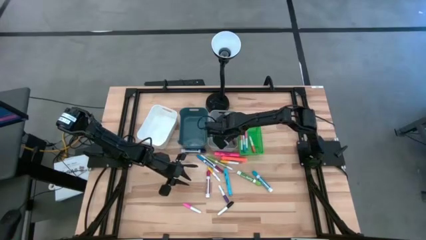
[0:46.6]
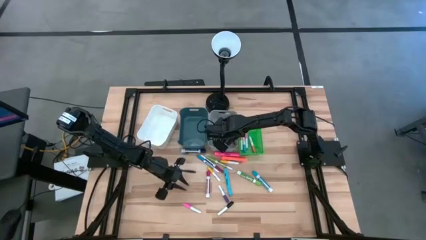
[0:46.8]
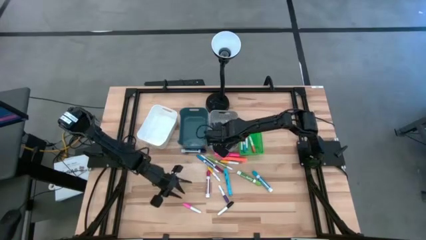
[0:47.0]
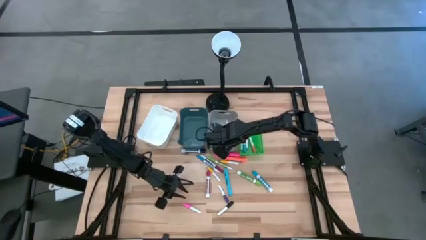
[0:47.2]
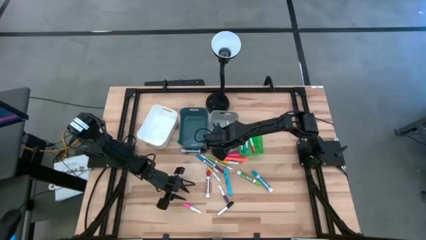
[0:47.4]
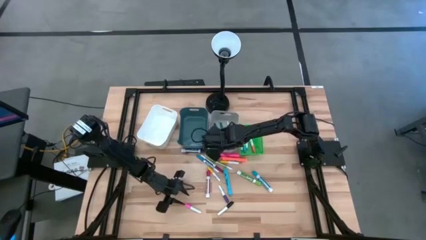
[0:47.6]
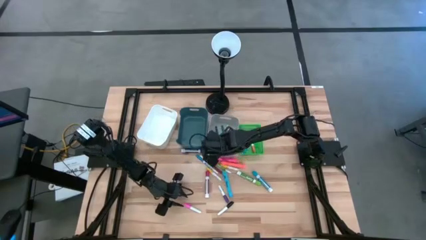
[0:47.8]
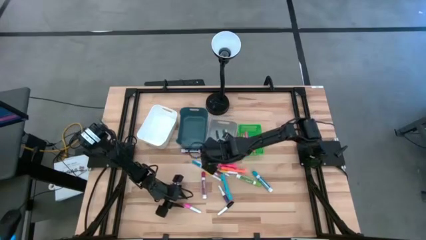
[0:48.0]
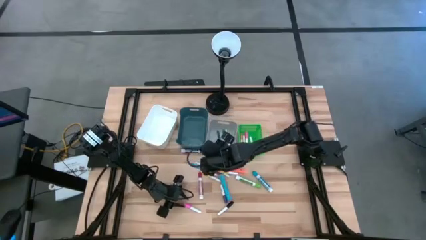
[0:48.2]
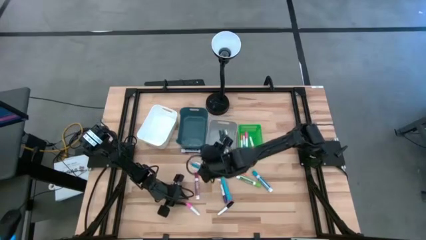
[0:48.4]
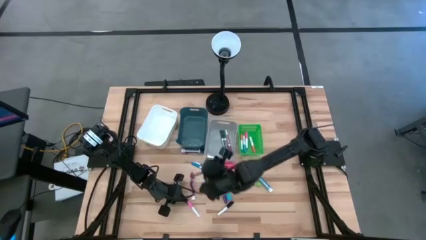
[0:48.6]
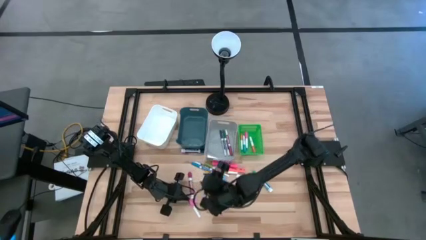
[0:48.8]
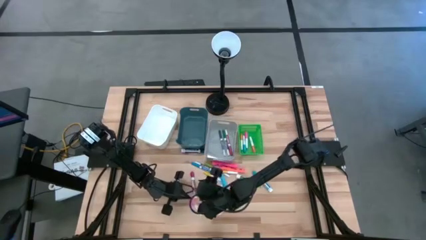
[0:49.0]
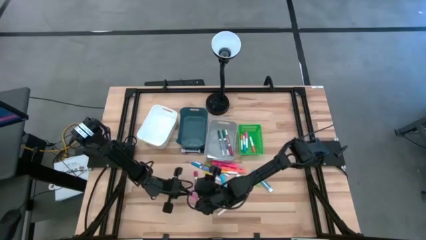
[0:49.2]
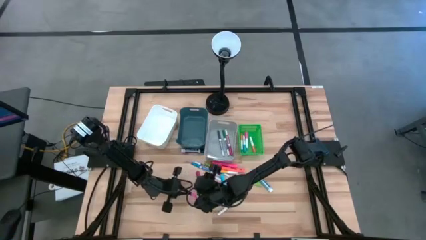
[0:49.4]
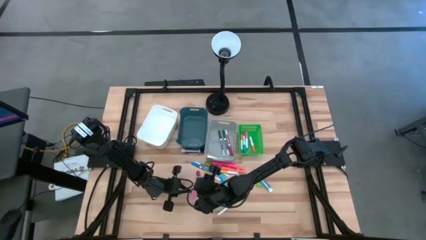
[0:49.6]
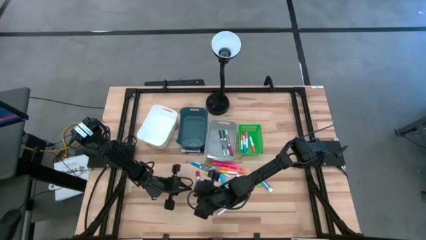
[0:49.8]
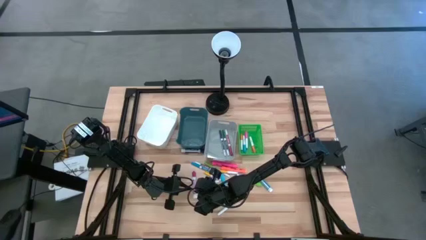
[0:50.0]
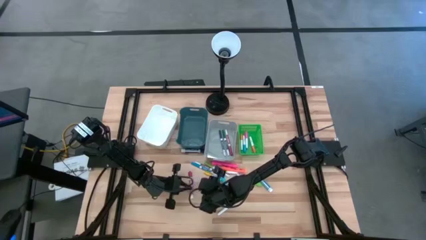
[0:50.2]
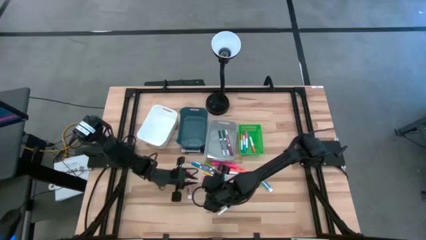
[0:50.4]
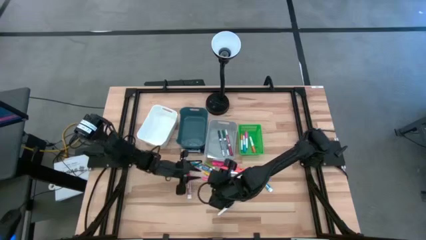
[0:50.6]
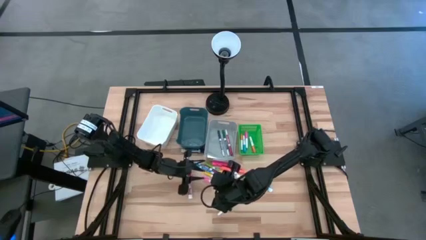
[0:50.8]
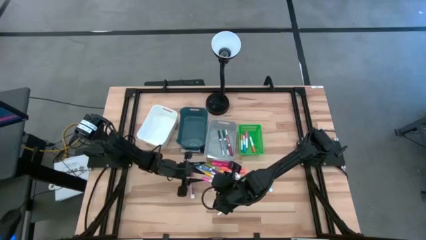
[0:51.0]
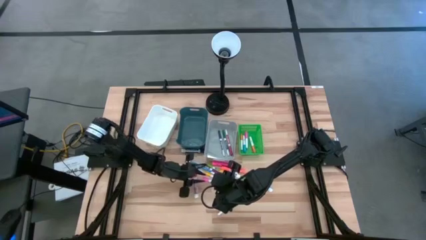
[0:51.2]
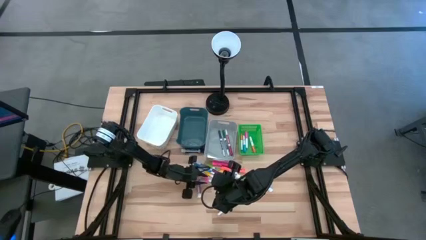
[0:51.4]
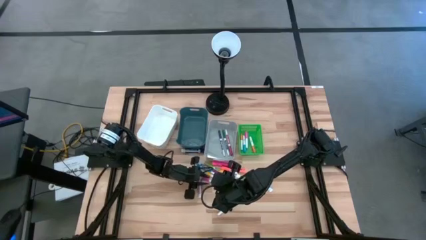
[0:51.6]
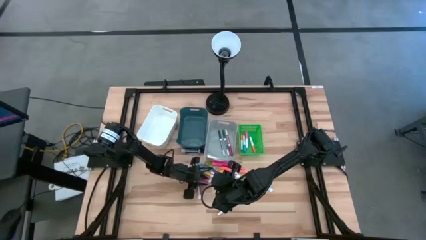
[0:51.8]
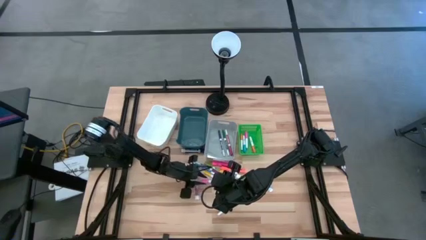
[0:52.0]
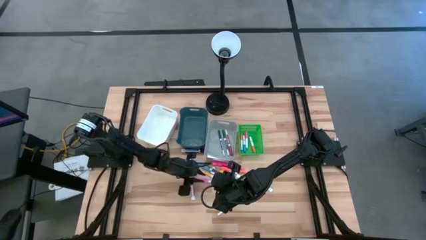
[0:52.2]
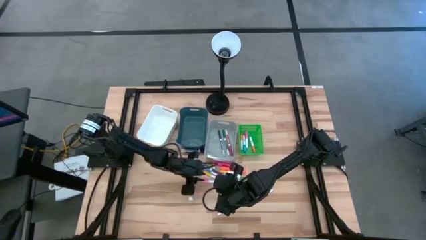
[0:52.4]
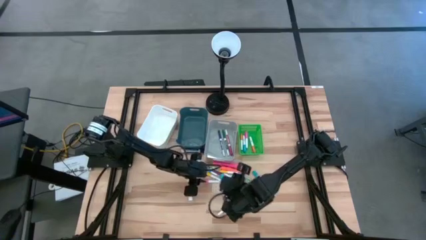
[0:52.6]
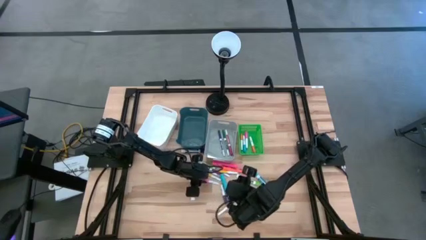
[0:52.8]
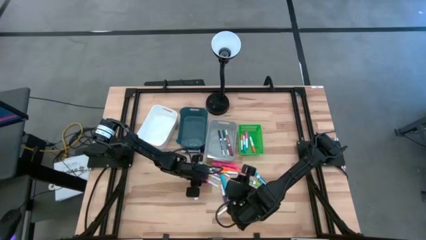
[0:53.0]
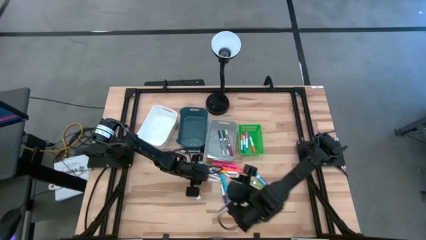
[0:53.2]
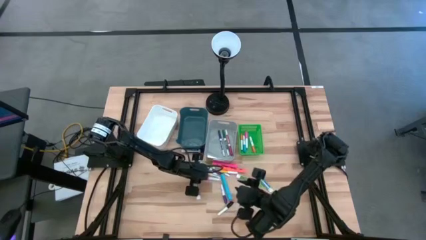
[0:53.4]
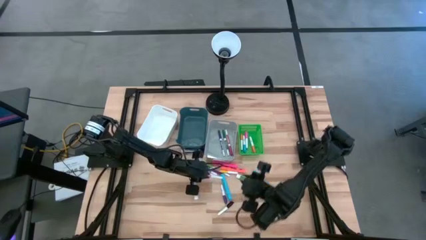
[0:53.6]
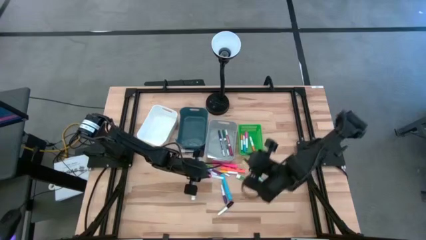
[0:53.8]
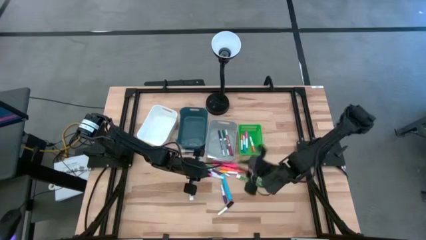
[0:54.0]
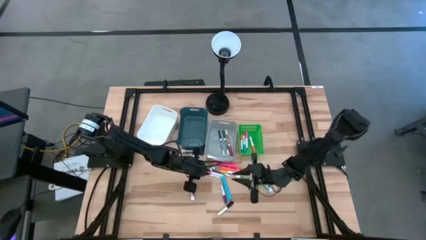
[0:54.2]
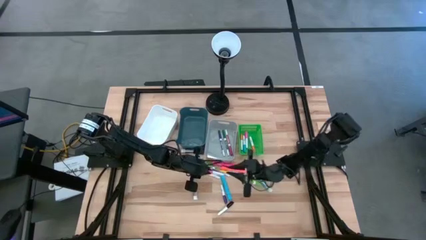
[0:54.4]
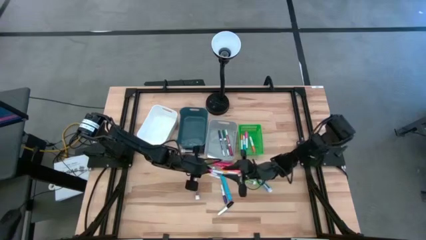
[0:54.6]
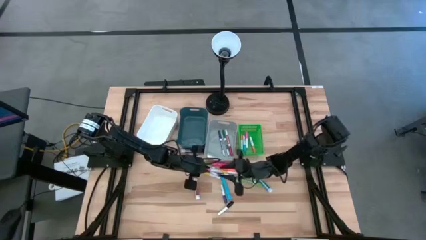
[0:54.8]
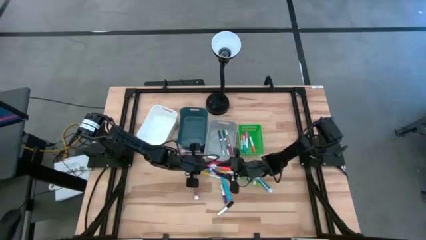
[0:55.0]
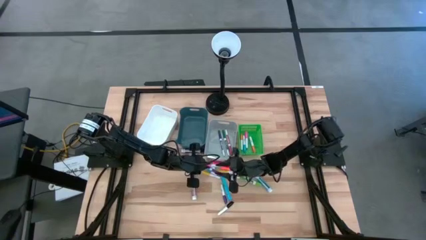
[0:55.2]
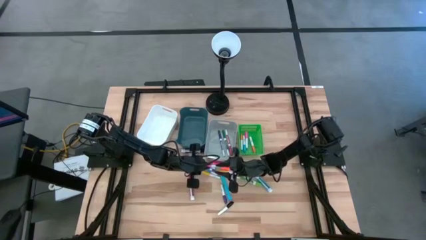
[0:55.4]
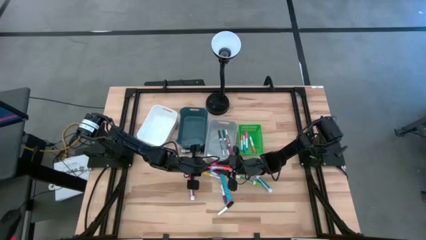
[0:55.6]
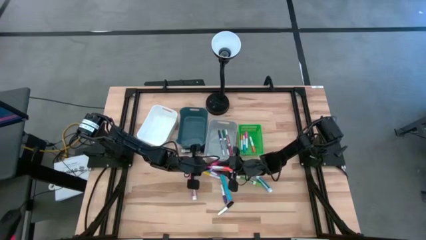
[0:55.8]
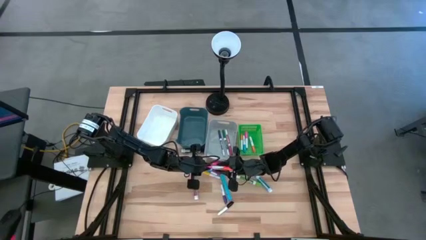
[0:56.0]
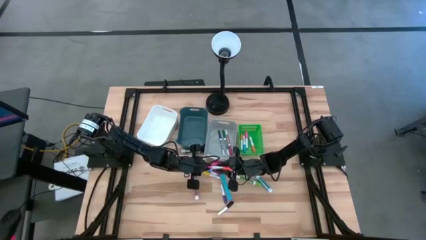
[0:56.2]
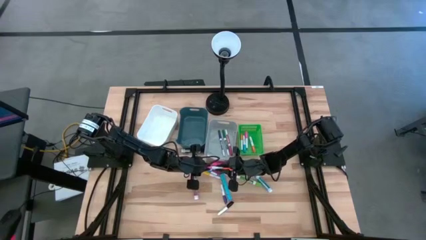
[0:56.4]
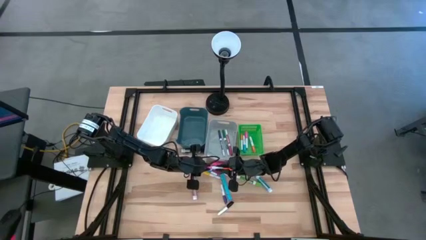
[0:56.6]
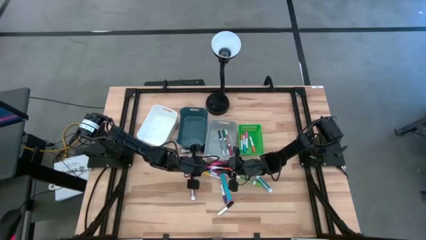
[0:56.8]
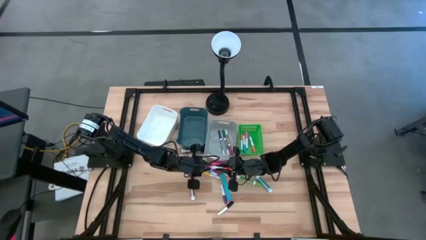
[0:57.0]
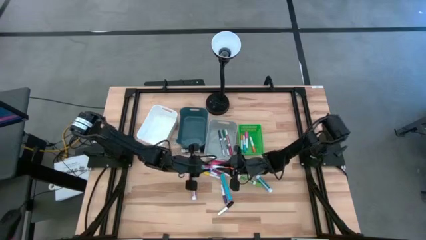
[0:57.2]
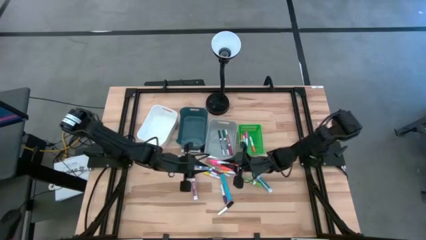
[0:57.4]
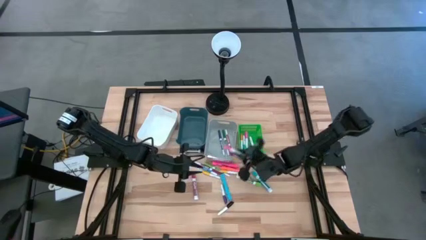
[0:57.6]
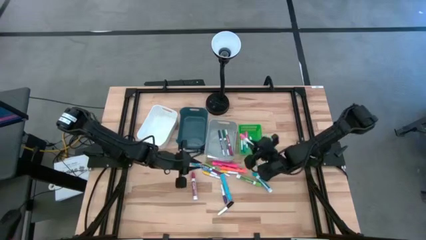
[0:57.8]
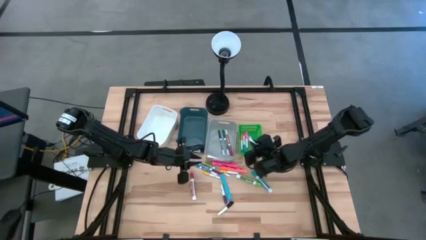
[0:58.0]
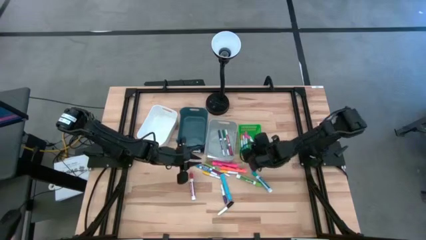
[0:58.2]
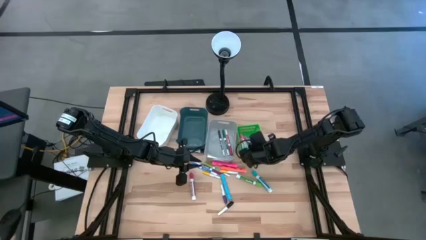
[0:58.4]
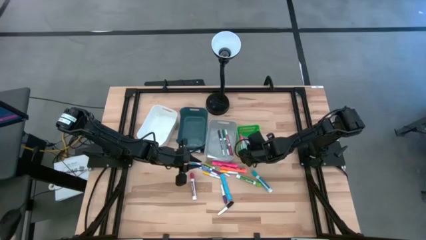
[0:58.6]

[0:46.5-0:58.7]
Task: Pick & Place Markers
Put the small pink highlighter pen into the green bin

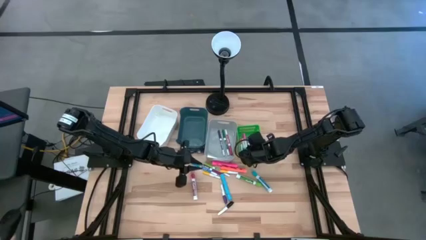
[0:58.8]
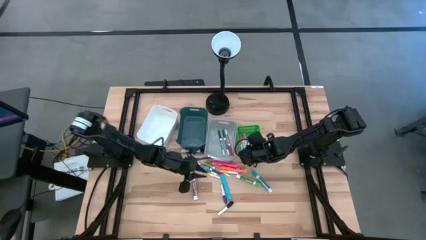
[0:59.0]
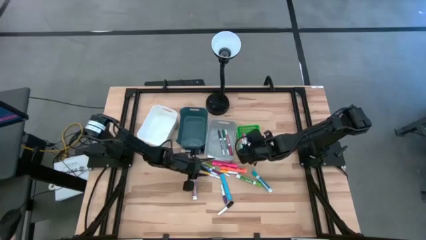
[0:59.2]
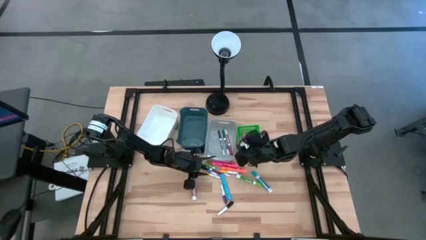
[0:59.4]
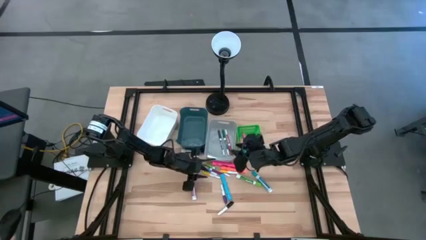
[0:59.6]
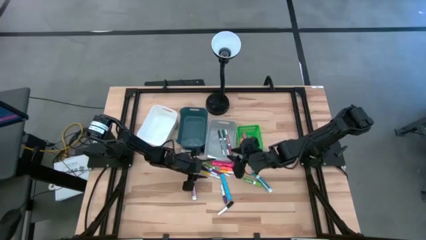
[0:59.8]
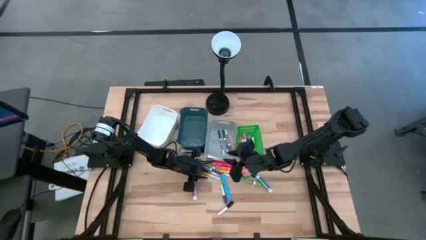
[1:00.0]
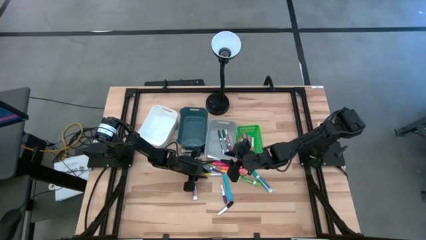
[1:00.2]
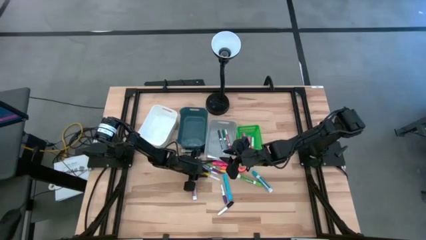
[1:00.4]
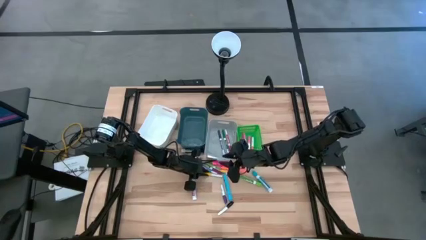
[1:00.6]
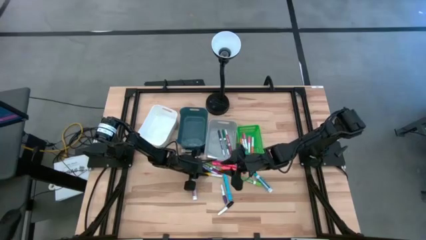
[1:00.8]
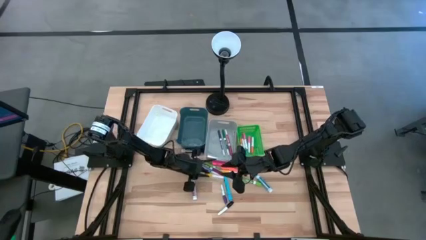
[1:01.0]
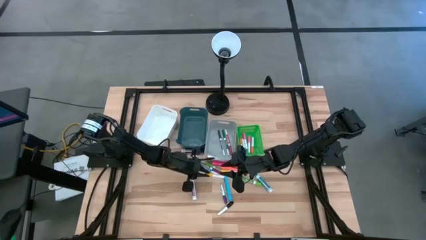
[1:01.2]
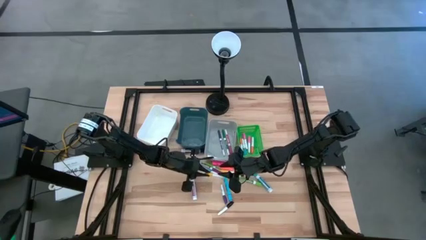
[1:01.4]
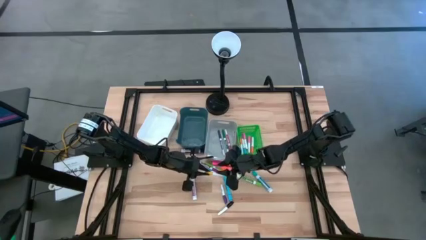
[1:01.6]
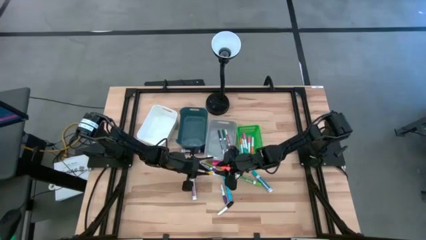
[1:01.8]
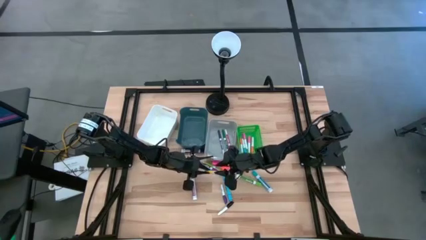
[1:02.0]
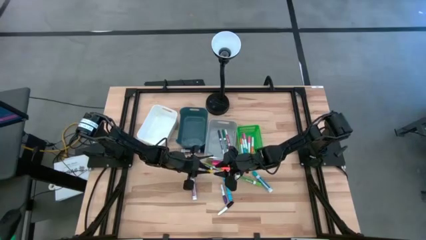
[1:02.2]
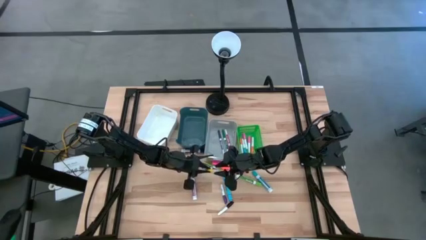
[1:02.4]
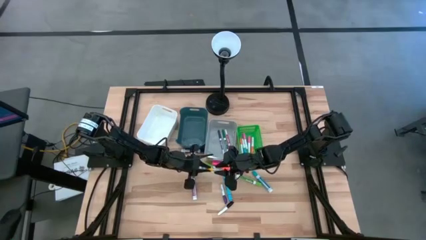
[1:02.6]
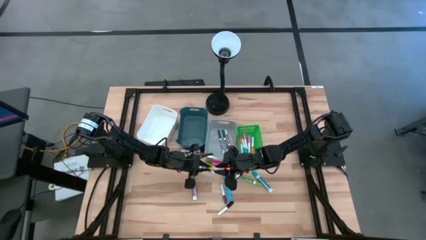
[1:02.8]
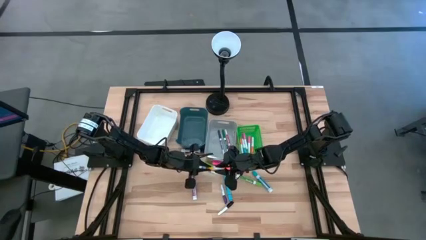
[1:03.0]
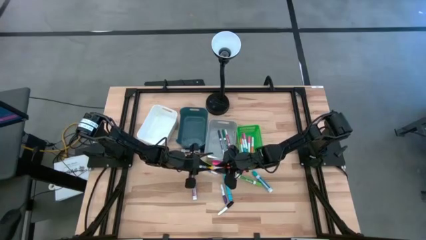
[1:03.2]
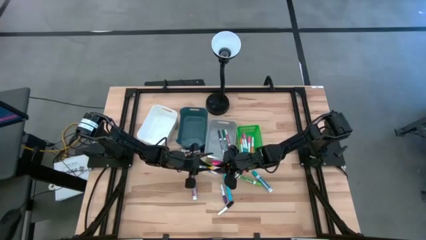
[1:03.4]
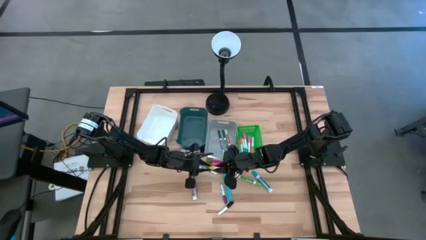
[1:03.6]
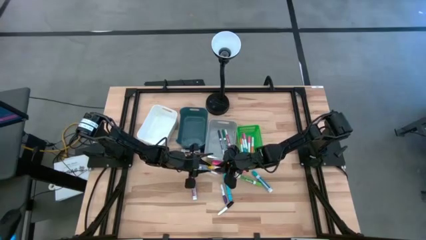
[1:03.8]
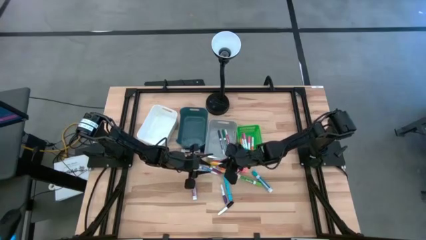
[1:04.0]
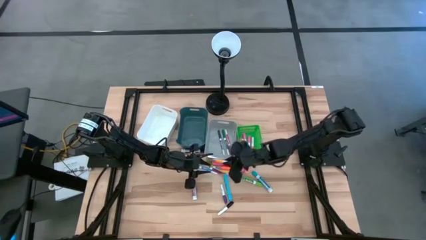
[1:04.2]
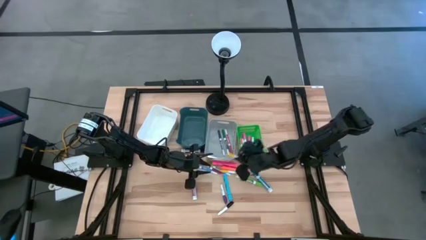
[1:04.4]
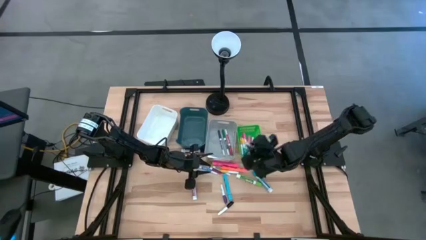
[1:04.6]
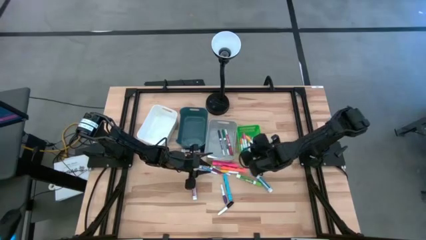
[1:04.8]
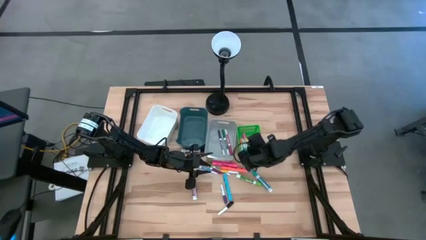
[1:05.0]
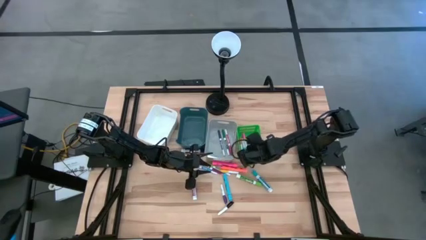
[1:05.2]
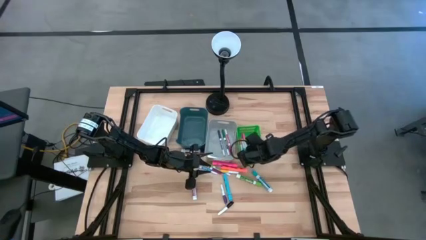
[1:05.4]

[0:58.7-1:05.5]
Put the left small yellow highlighter pen into the green bin
